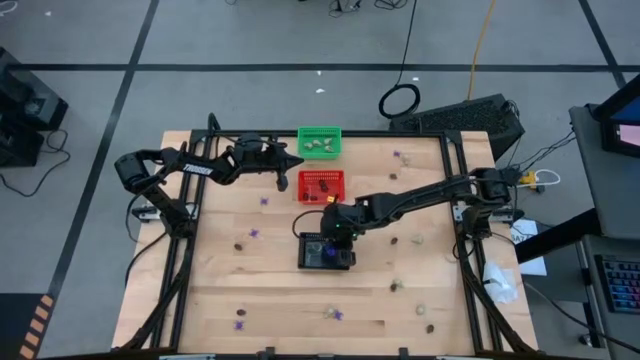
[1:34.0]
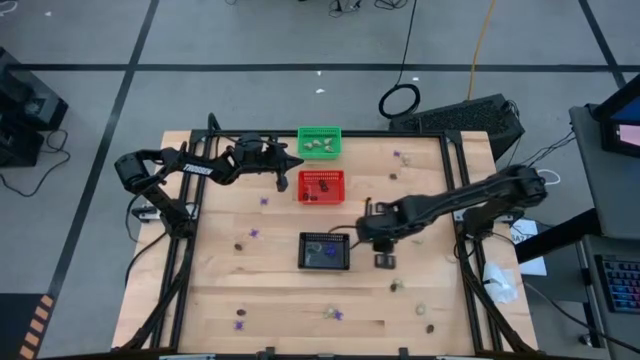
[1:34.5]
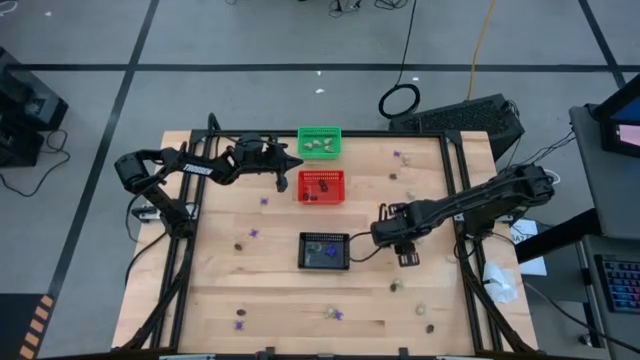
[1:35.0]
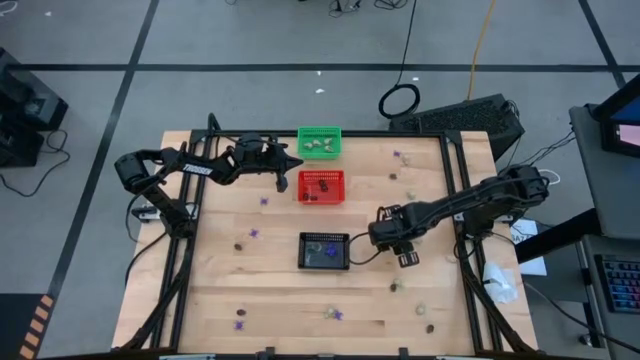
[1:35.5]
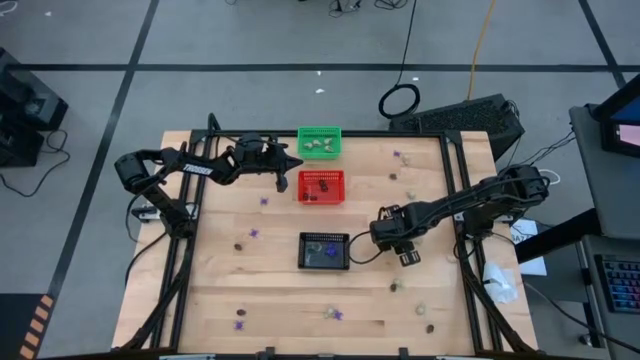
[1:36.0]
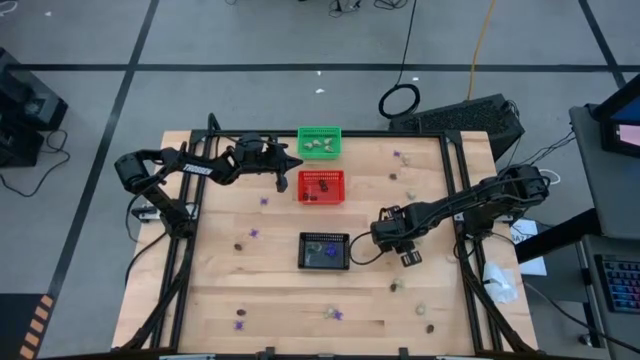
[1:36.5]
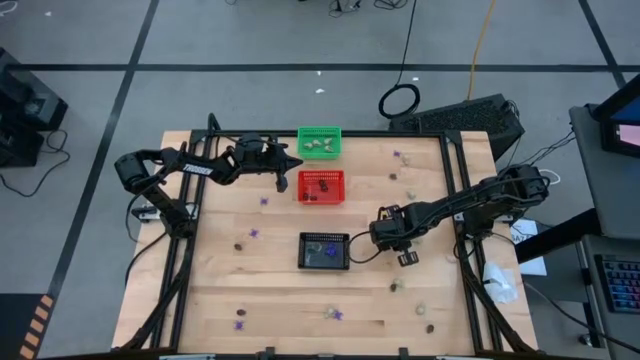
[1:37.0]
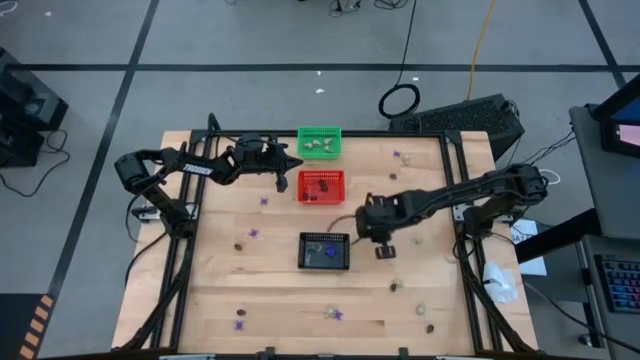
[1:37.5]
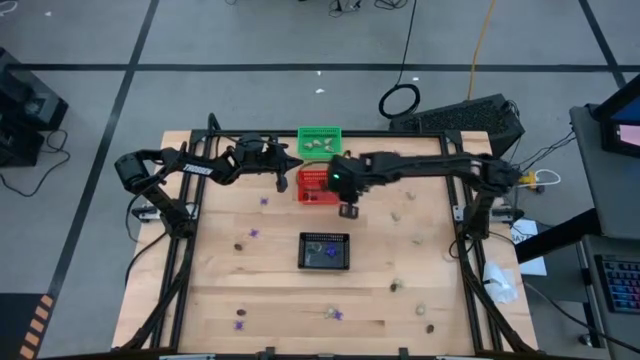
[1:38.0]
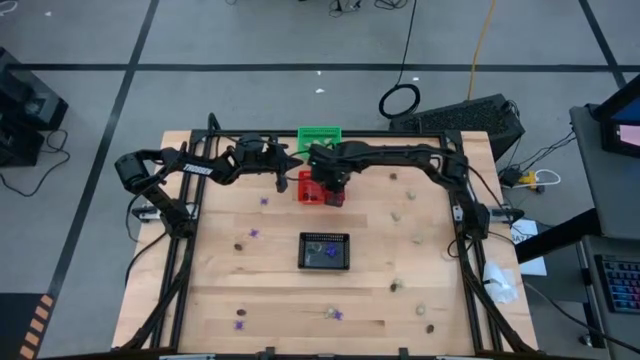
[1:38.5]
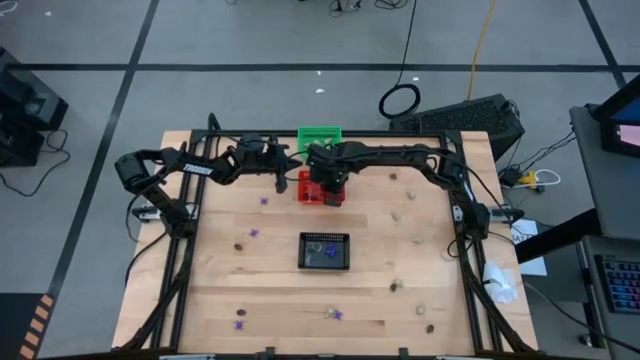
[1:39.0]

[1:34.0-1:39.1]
Task: Sort Halloween decoration
Put the black skull toy into the red basket

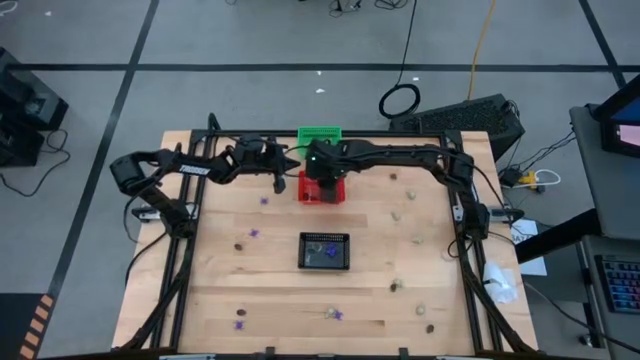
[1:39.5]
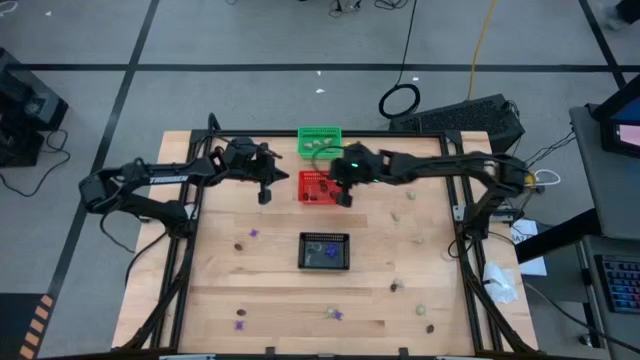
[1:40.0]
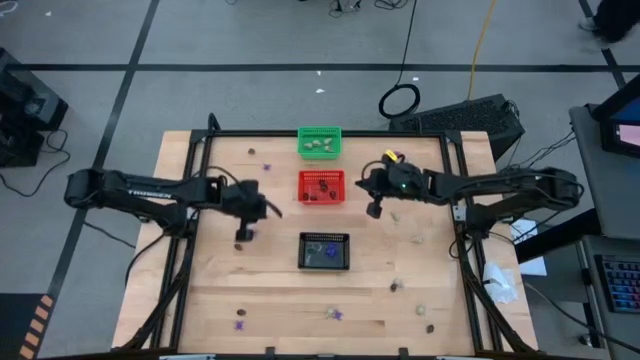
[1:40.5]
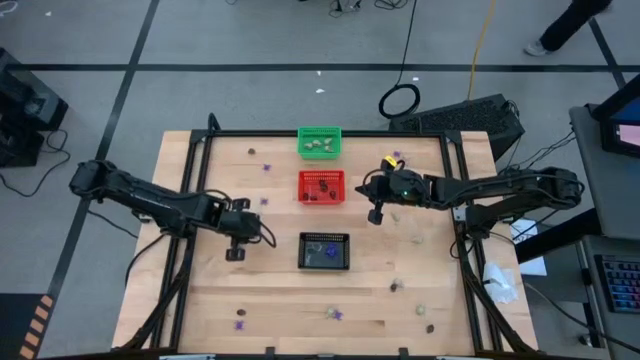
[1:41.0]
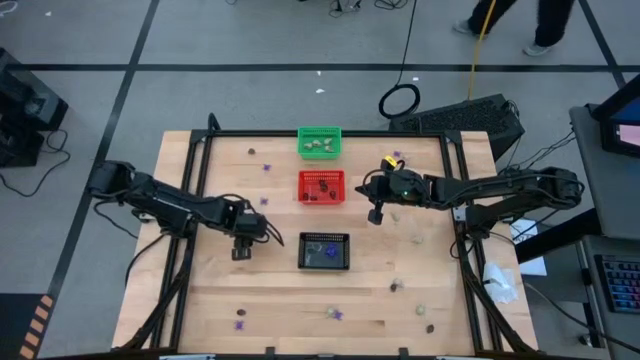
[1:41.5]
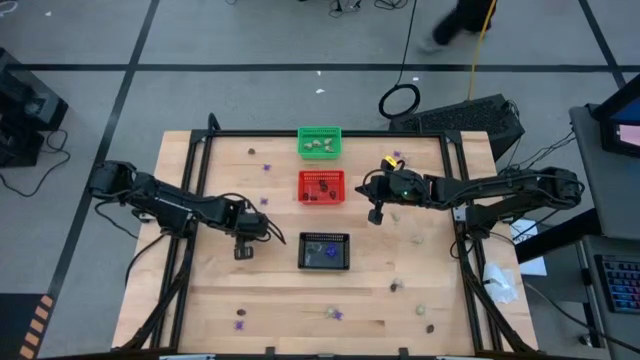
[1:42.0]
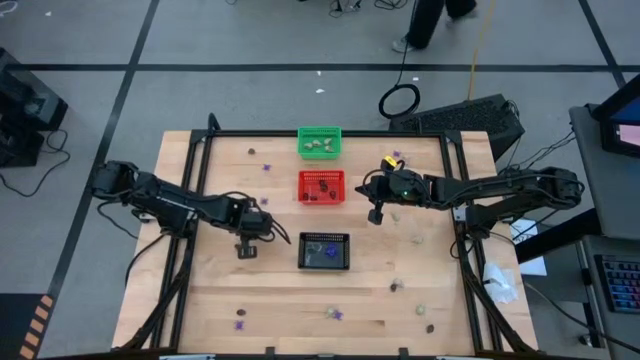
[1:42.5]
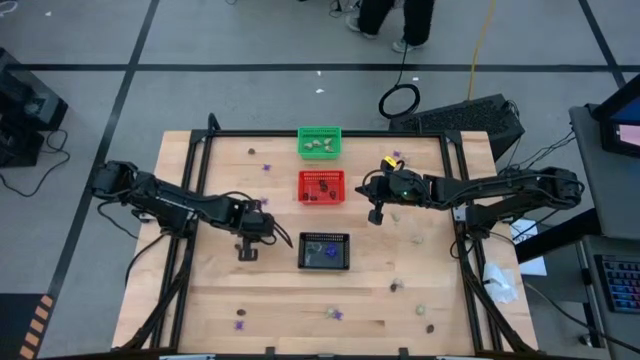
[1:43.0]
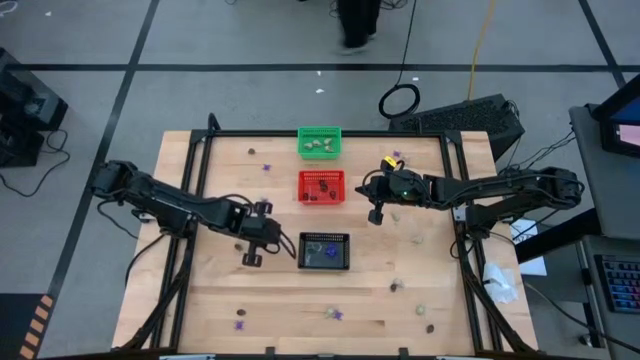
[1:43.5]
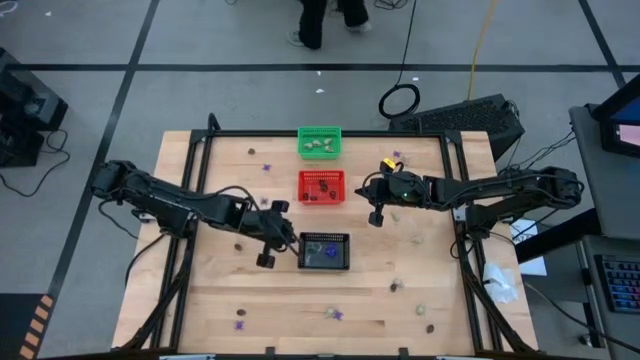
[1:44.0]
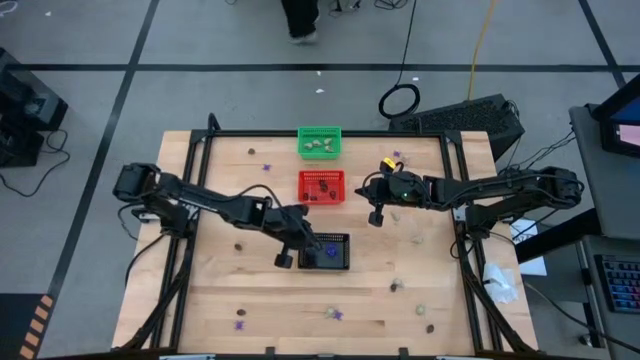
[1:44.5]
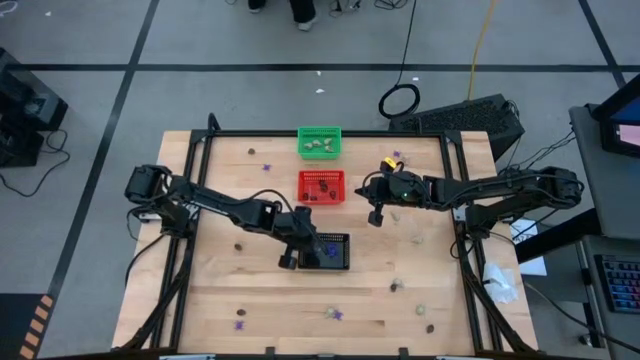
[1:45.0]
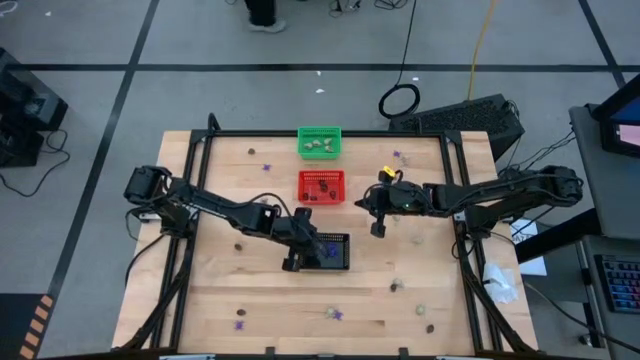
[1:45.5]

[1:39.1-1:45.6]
Put the violet spider toy into the black basket

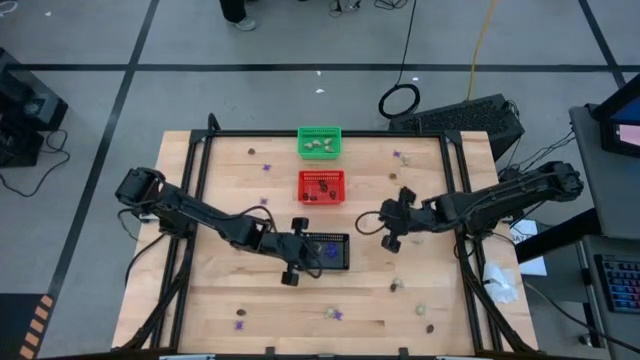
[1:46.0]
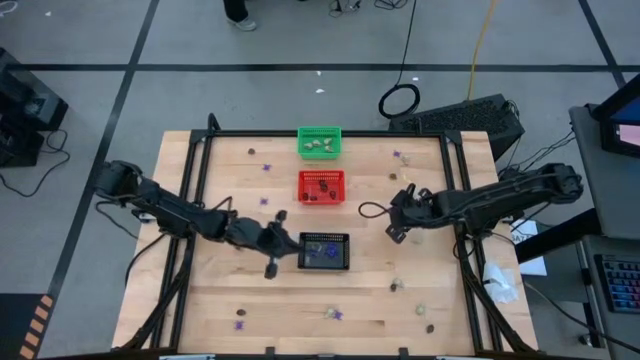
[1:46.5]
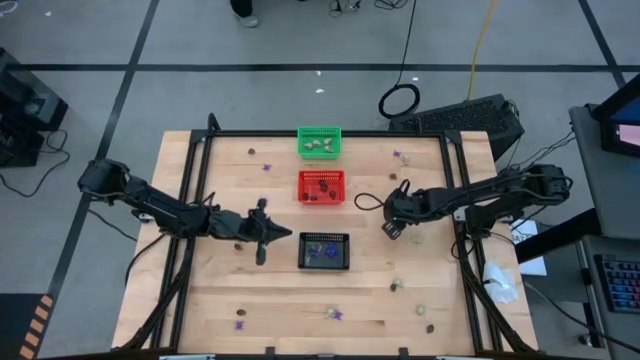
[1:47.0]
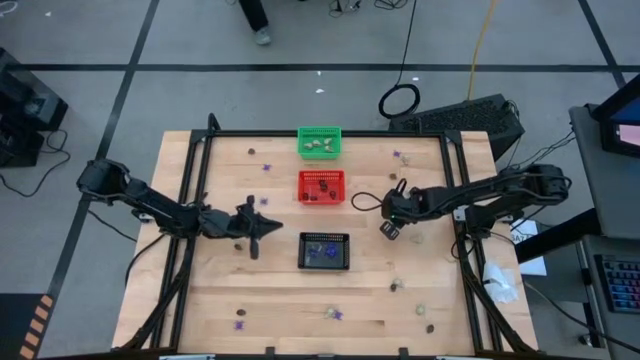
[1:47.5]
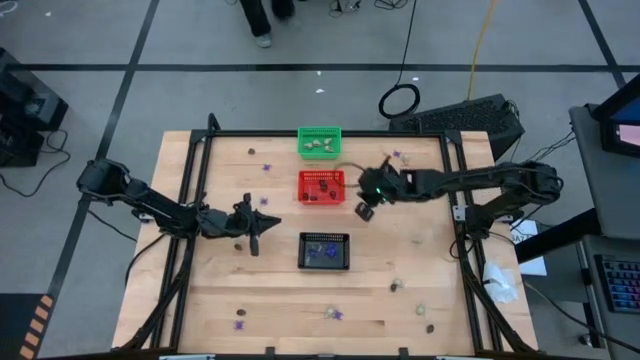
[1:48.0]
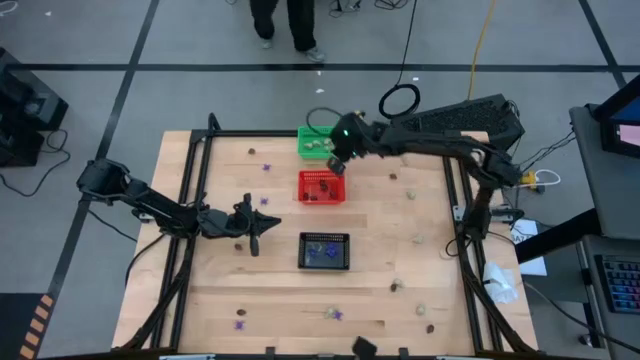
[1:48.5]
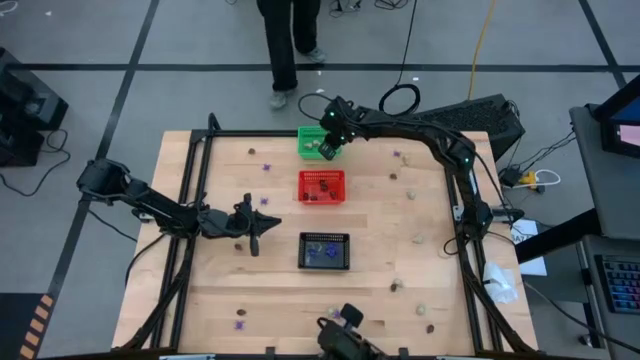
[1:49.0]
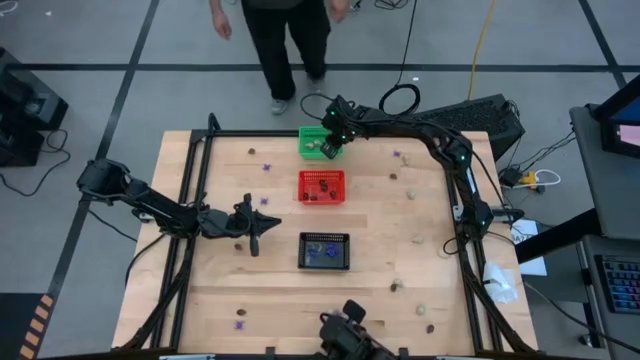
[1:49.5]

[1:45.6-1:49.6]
Put the white skull toy into the green basket

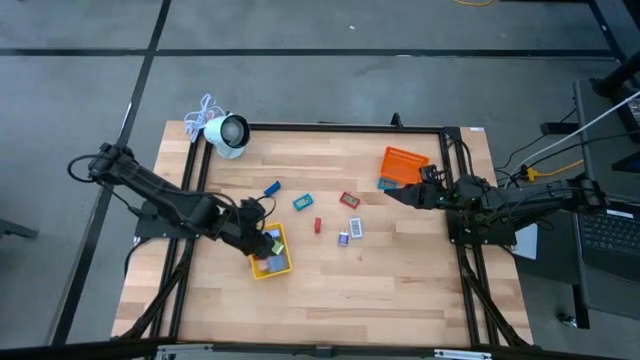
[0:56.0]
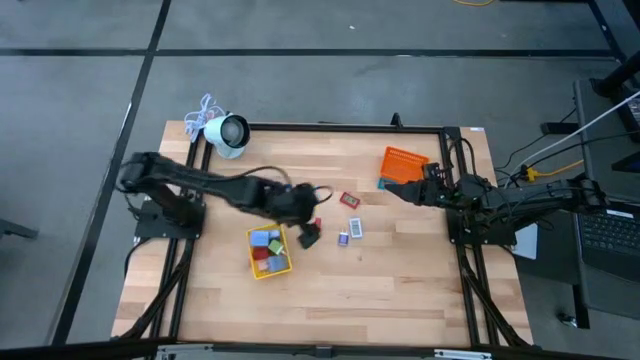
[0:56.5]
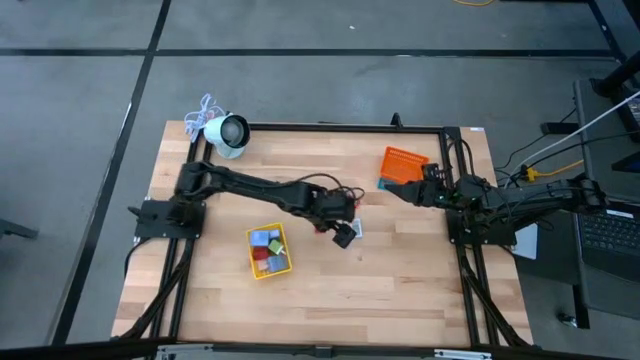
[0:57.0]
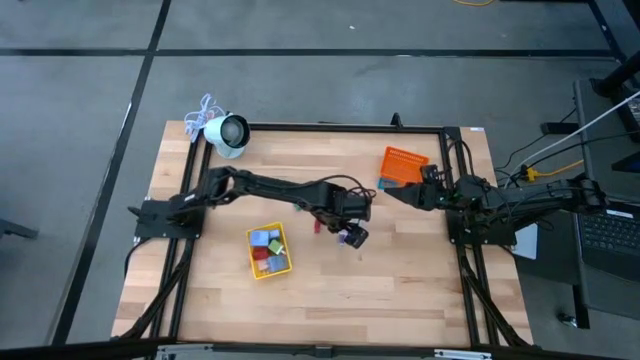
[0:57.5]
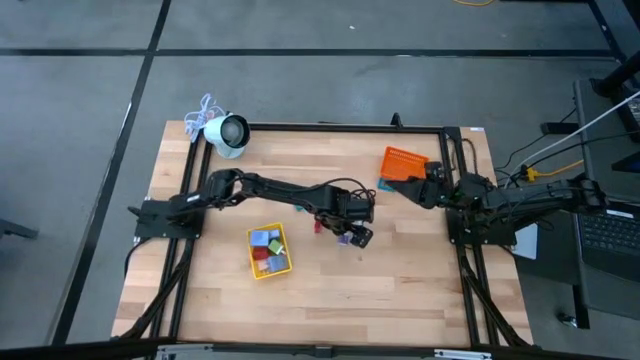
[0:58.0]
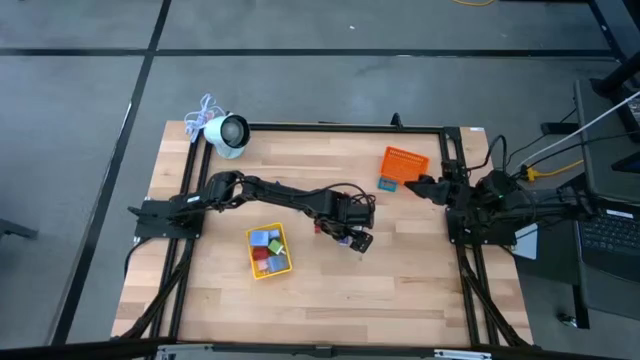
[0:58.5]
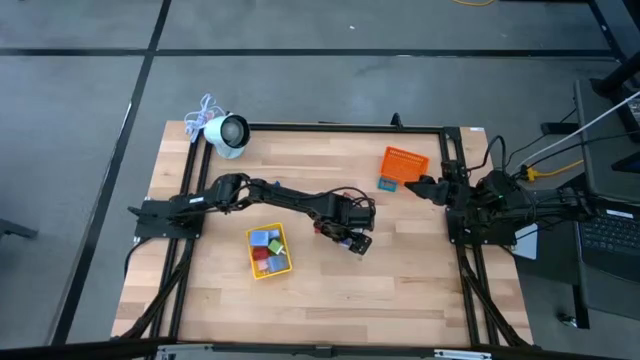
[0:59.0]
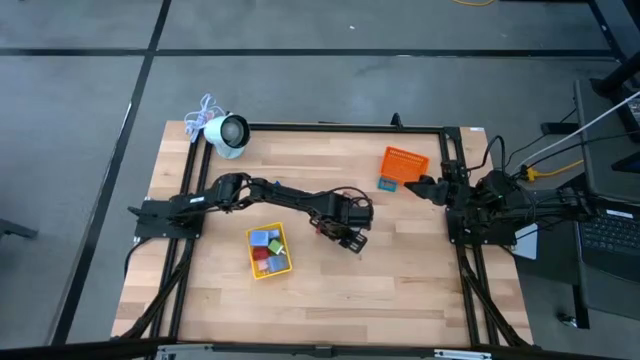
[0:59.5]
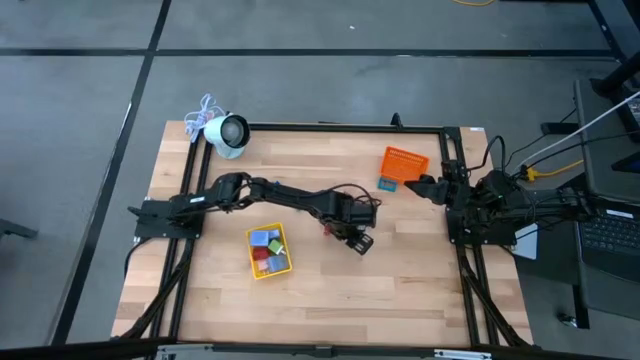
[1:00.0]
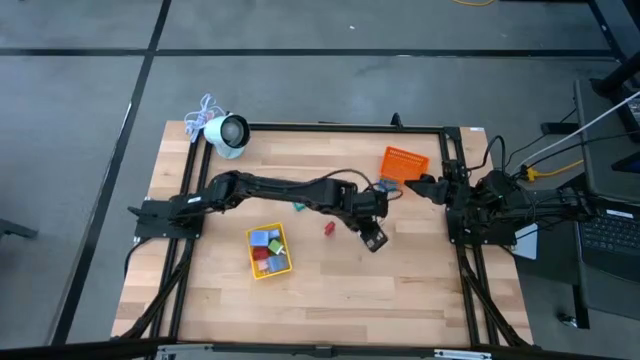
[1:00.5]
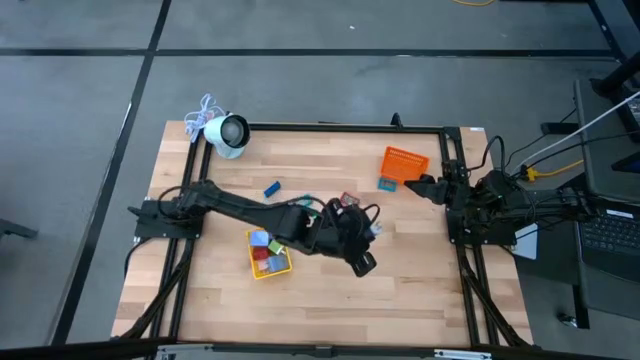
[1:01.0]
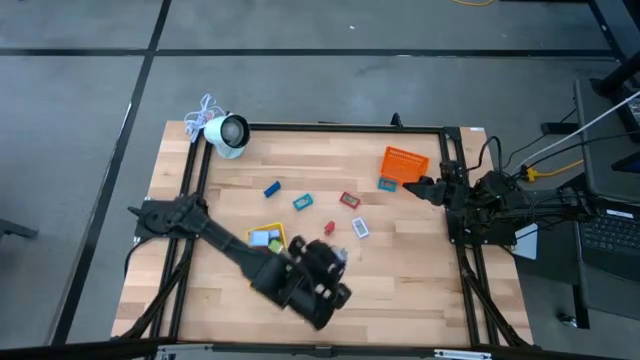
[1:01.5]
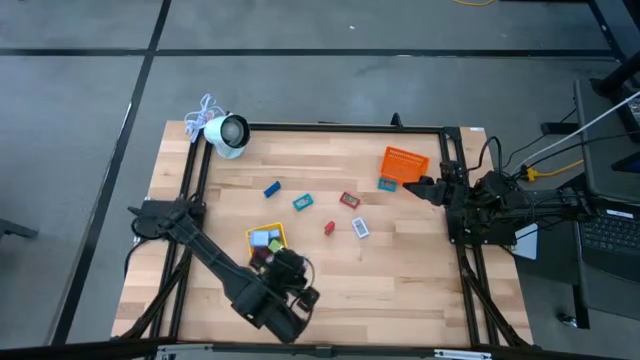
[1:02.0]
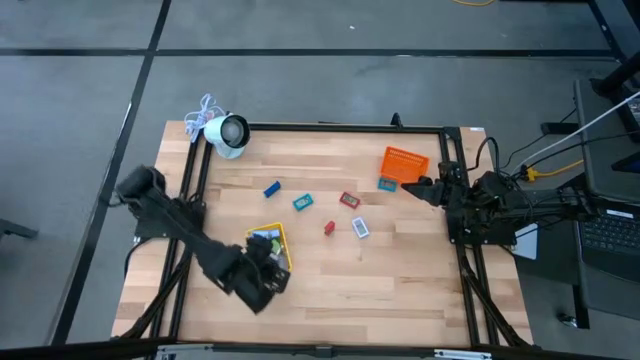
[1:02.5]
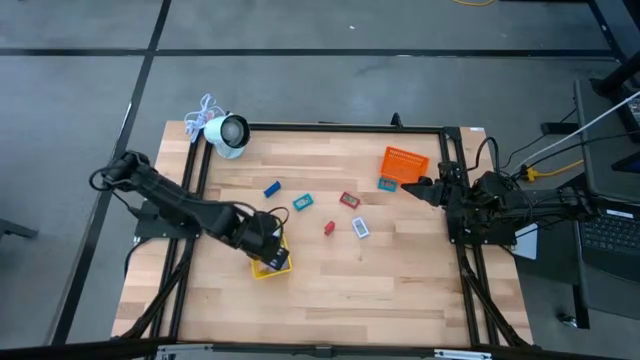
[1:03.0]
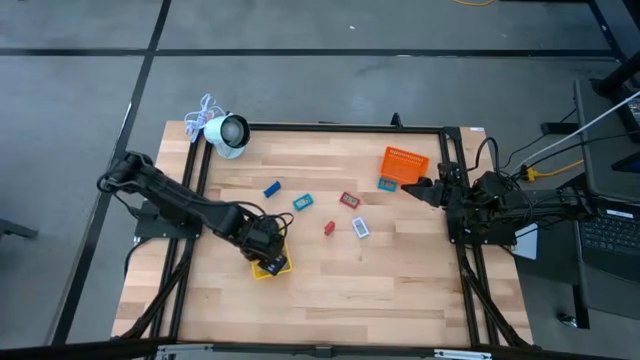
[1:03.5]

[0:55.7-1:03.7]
Task: Pick & Place Office items
Put the violet charger adapter into the yellow bin
